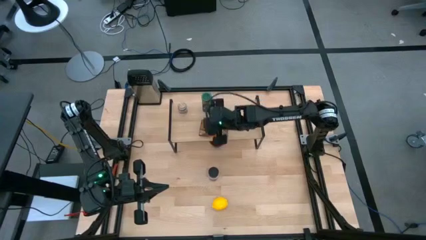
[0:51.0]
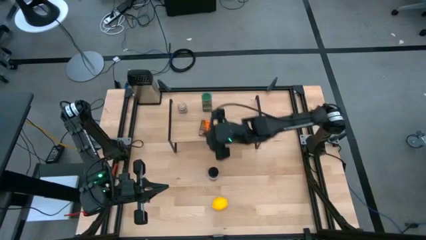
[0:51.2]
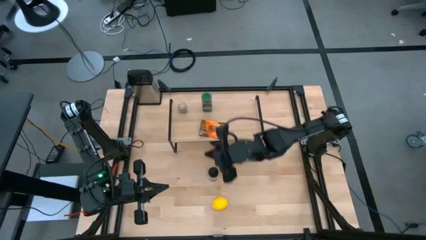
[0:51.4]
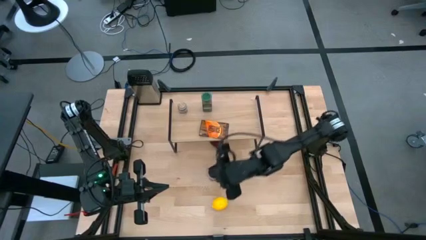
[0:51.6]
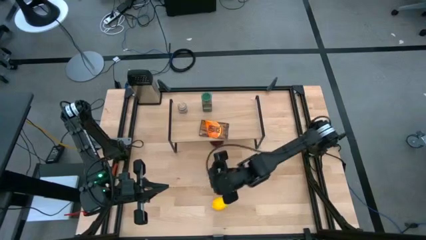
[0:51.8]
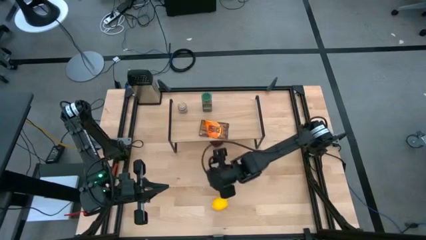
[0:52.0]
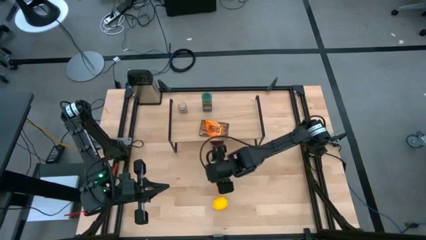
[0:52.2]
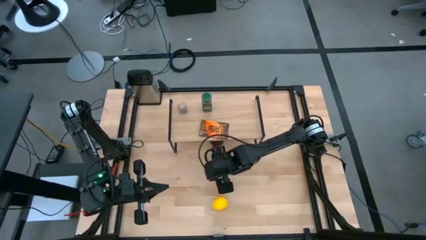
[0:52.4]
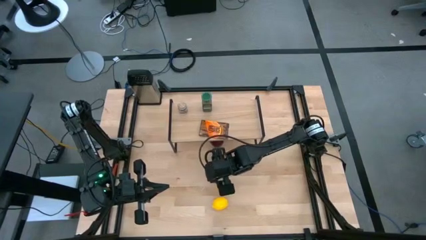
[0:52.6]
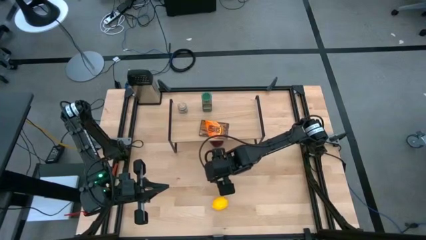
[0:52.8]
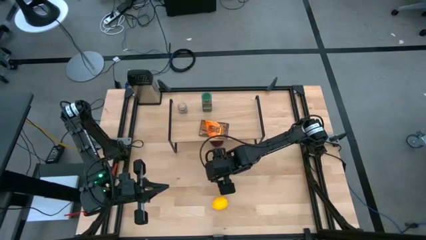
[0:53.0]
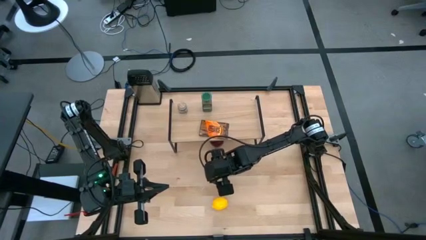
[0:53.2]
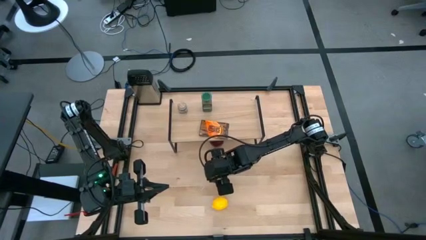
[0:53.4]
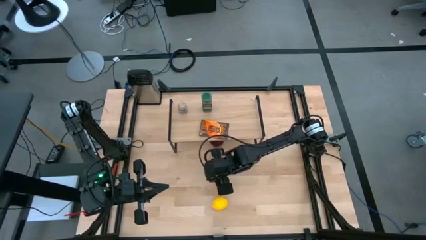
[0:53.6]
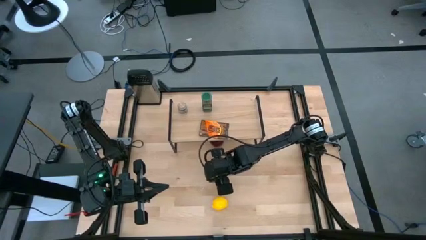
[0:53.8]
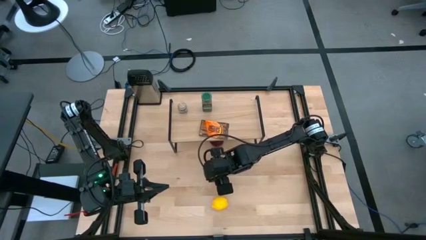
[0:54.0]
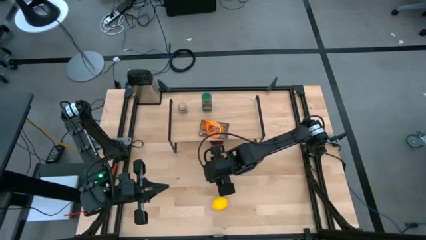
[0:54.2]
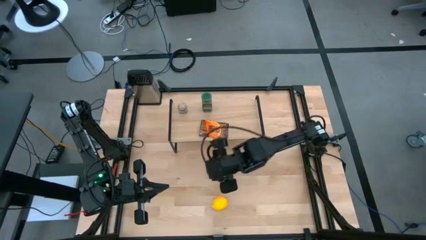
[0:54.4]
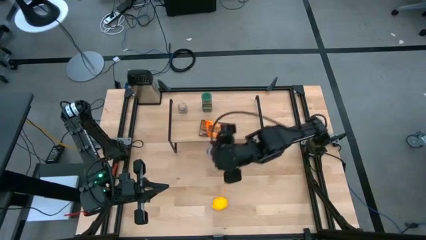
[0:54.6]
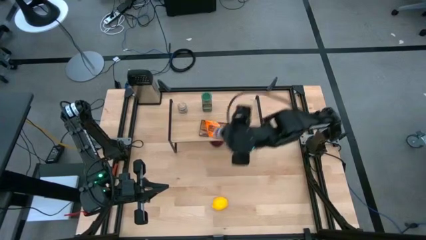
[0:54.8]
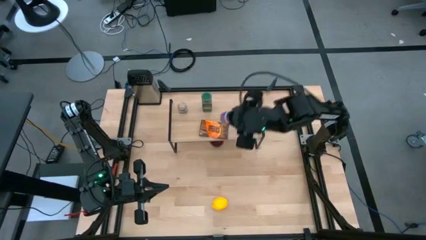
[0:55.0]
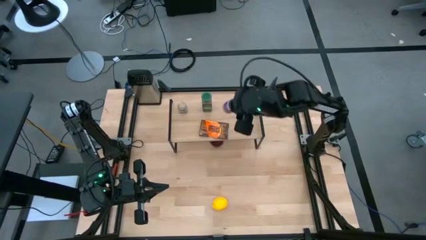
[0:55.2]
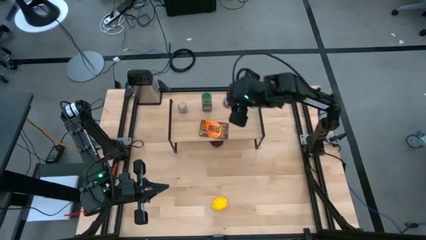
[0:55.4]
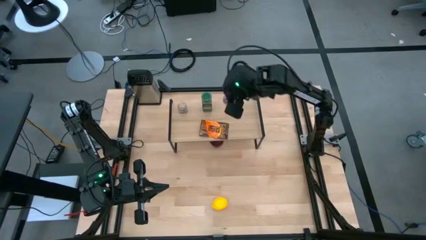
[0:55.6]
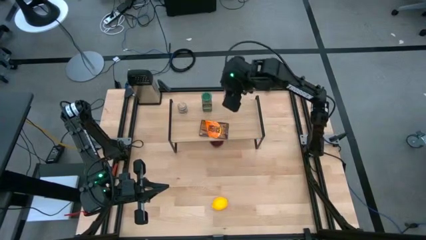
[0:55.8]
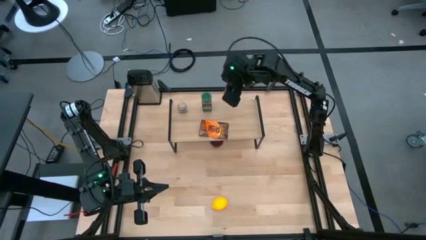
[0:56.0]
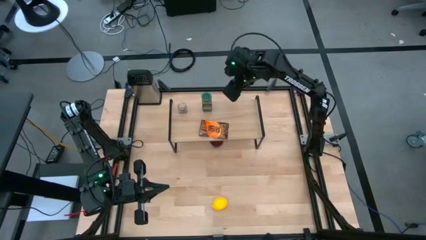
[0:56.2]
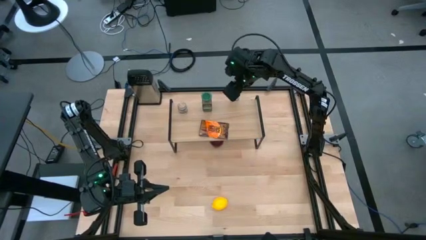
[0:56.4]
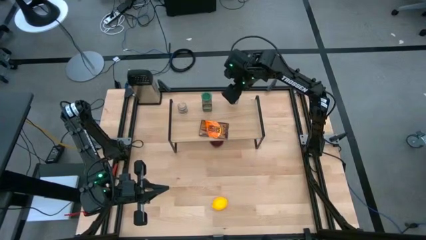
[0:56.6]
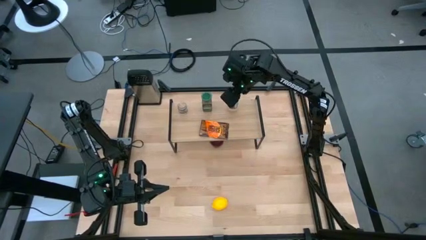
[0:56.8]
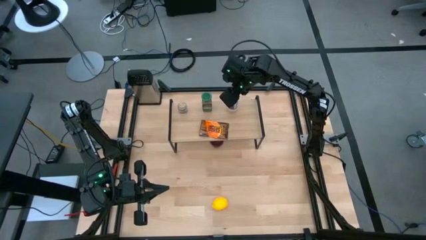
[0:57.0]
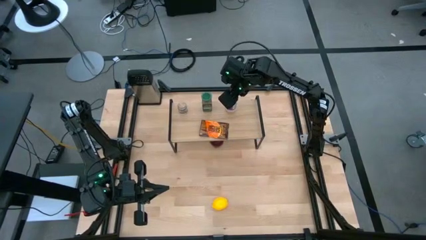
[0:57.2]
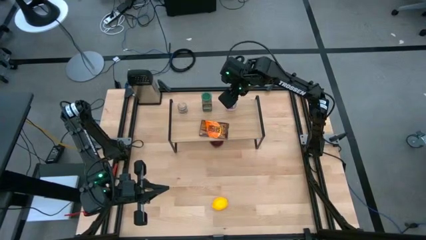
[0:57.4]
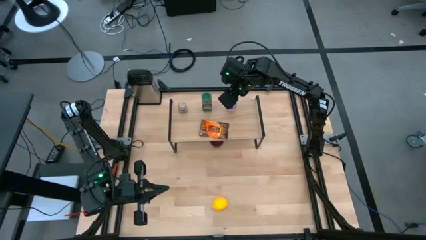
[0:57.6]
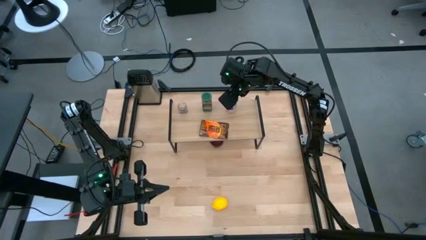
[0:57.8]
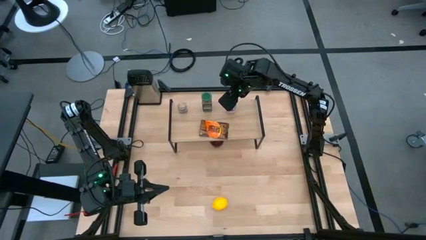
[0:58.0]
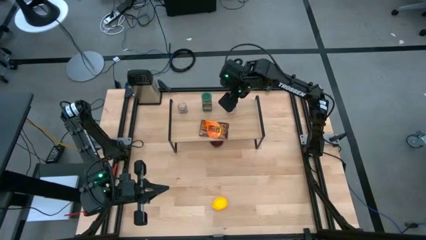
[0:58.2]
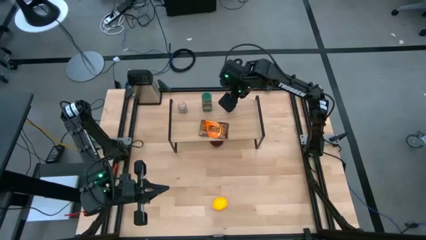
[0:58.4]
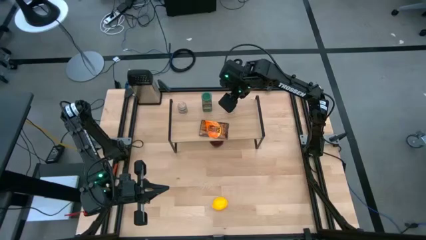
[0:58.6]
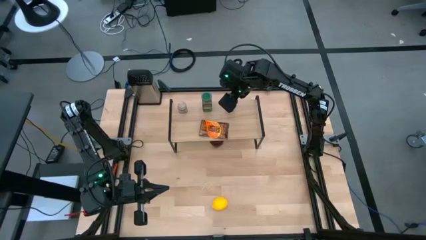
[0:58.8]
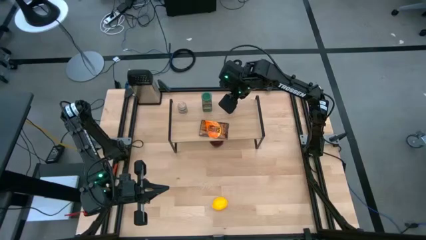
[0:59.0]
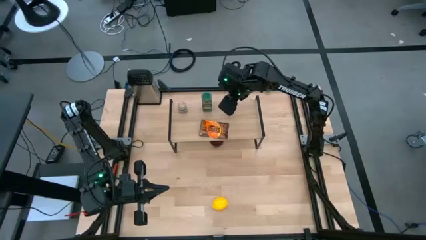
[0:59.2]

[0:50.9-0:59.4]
Task: Shelf spices
Put the black seasoning bottle on the shelf

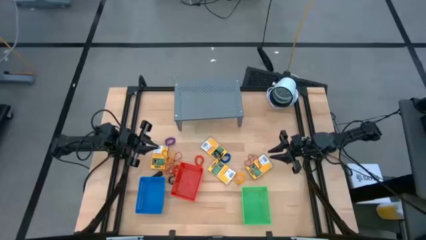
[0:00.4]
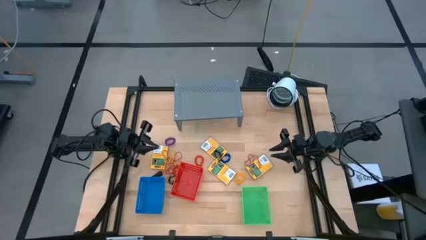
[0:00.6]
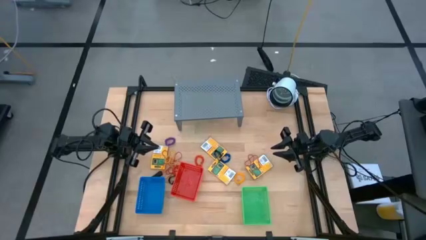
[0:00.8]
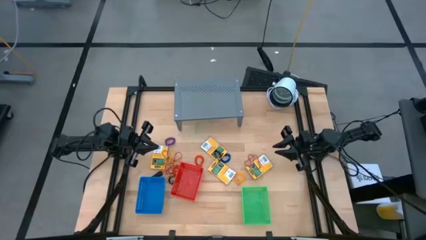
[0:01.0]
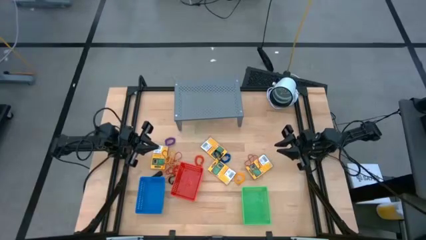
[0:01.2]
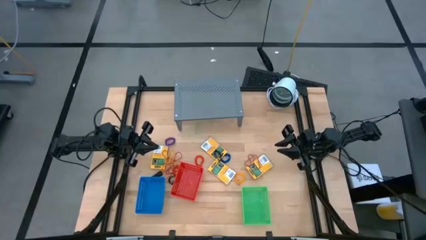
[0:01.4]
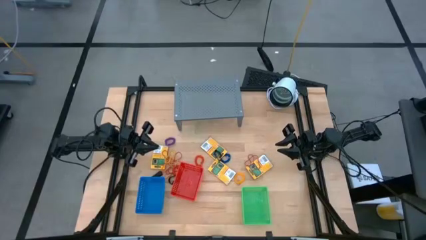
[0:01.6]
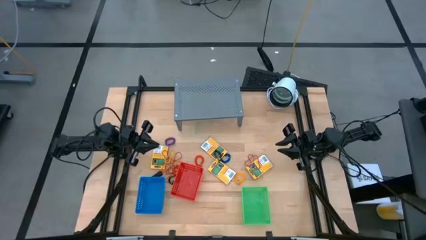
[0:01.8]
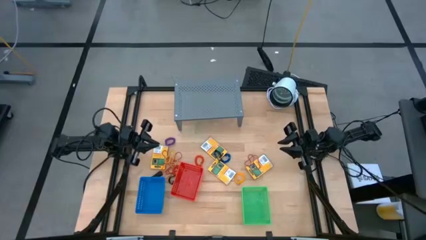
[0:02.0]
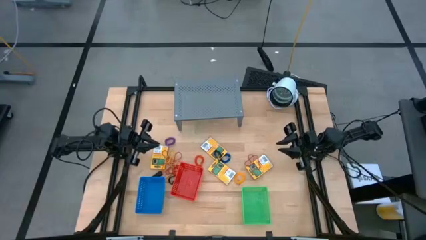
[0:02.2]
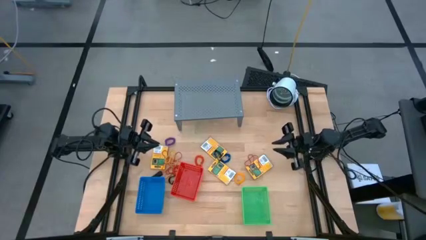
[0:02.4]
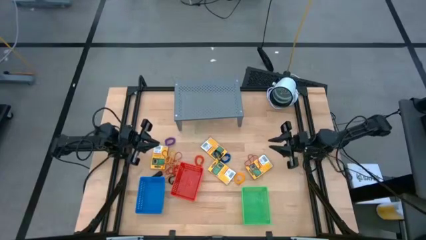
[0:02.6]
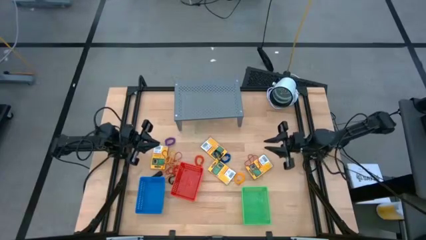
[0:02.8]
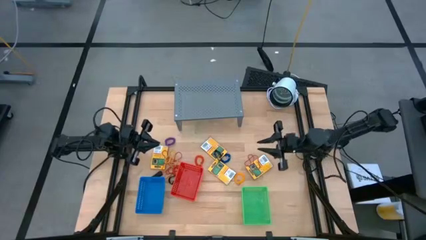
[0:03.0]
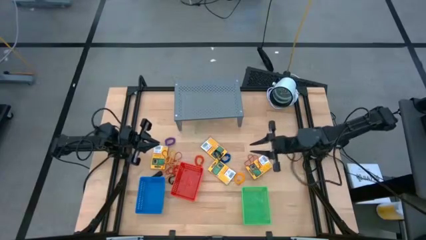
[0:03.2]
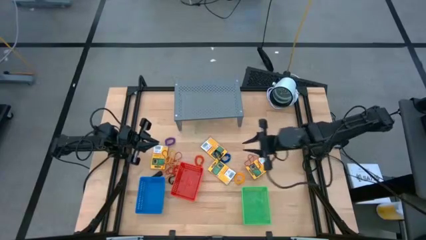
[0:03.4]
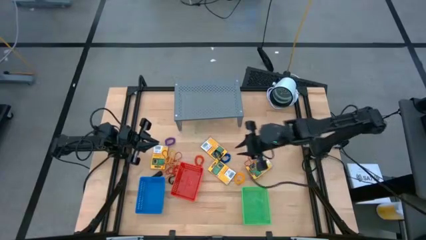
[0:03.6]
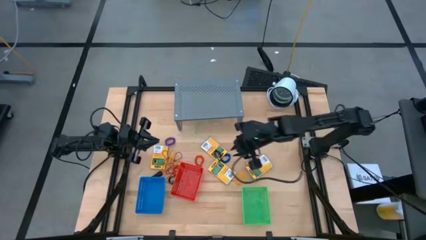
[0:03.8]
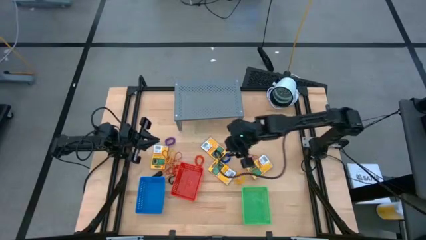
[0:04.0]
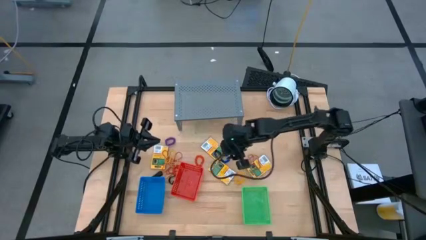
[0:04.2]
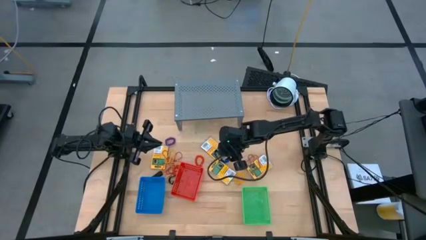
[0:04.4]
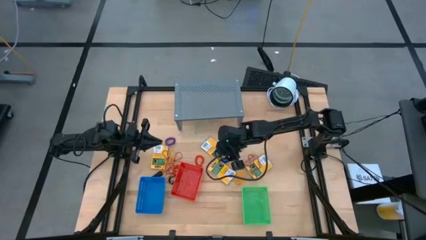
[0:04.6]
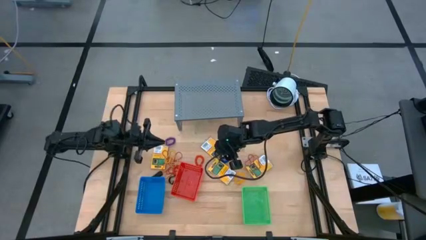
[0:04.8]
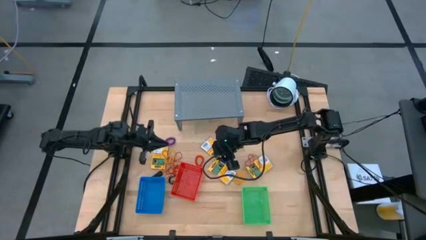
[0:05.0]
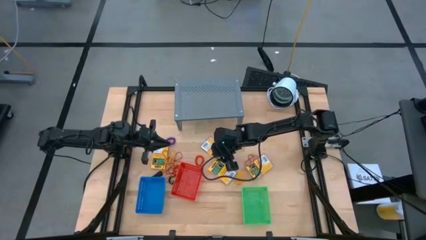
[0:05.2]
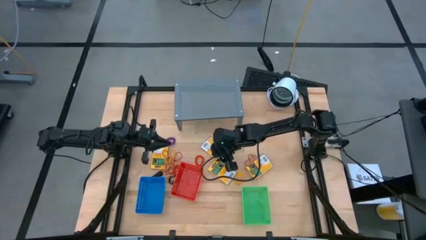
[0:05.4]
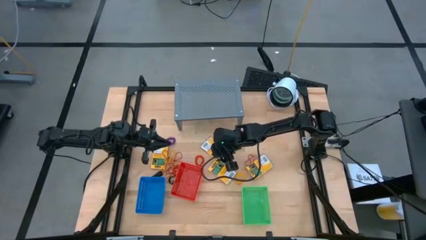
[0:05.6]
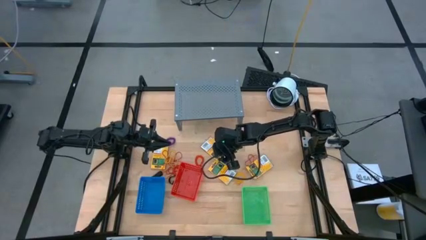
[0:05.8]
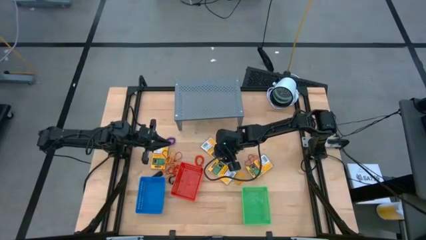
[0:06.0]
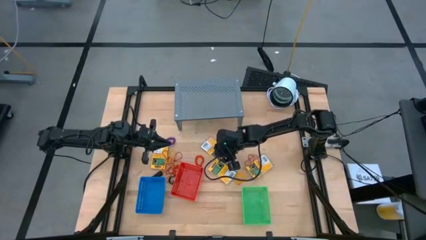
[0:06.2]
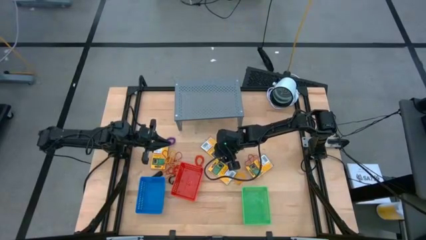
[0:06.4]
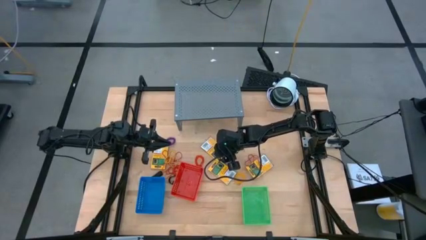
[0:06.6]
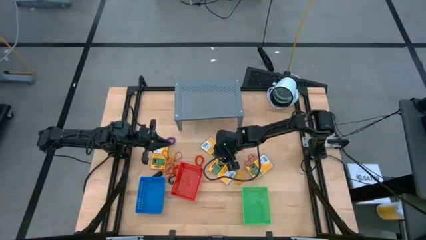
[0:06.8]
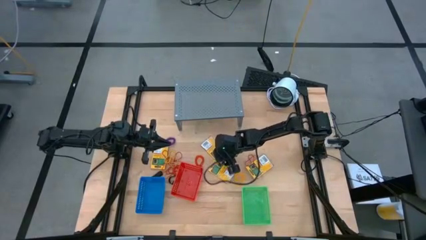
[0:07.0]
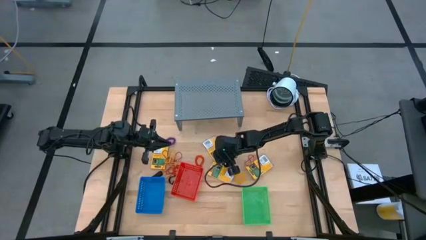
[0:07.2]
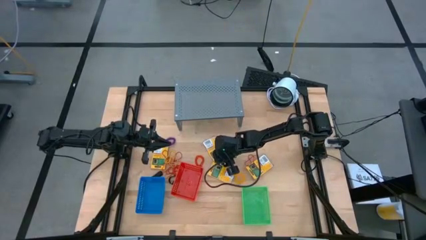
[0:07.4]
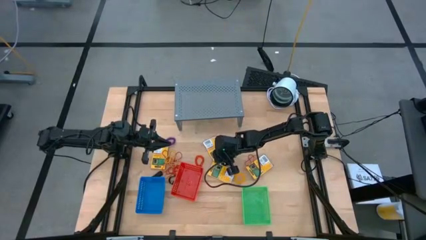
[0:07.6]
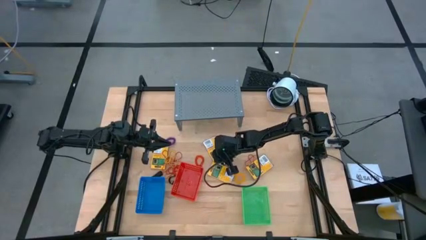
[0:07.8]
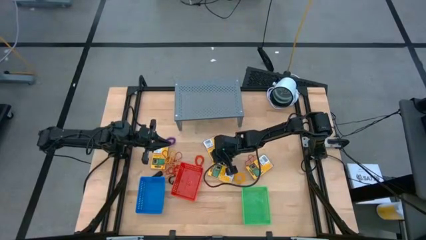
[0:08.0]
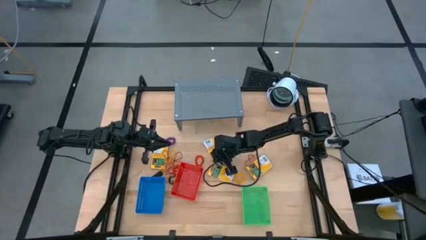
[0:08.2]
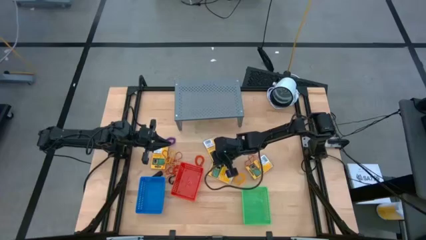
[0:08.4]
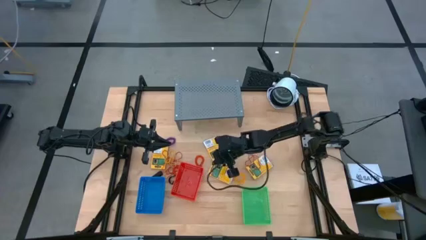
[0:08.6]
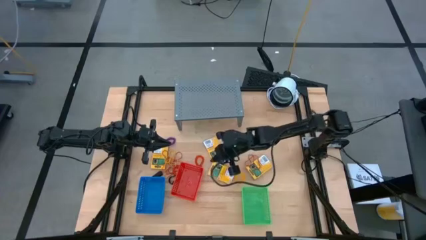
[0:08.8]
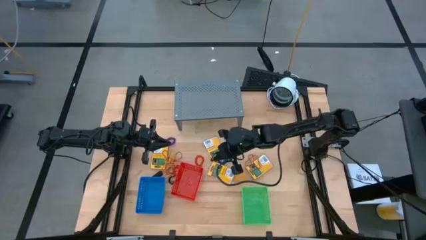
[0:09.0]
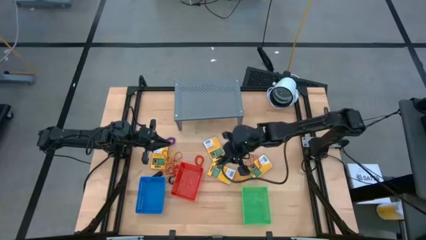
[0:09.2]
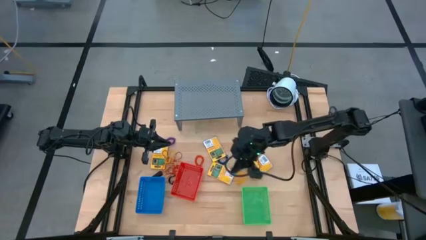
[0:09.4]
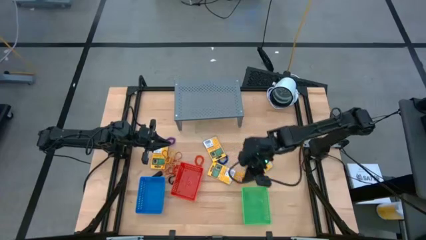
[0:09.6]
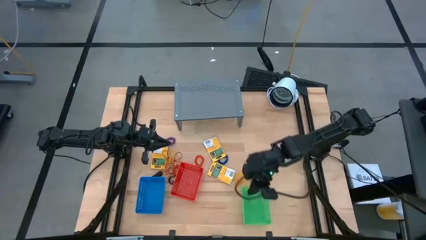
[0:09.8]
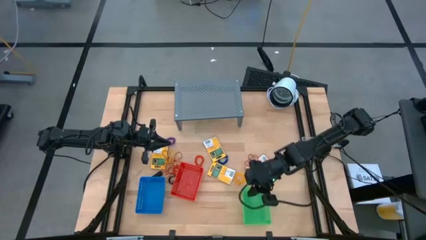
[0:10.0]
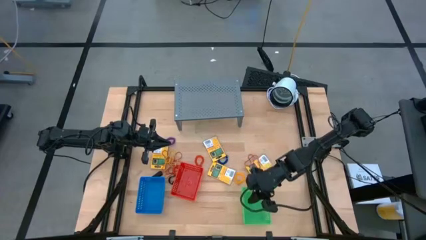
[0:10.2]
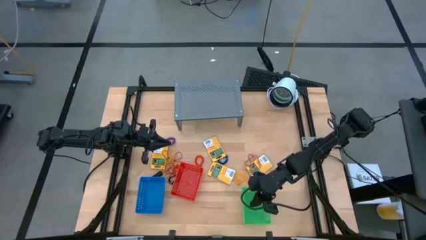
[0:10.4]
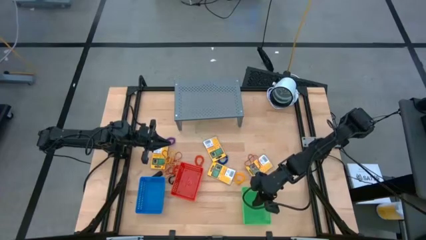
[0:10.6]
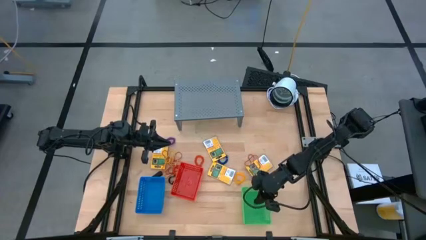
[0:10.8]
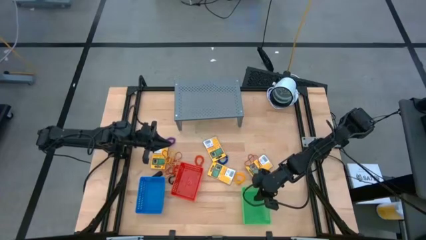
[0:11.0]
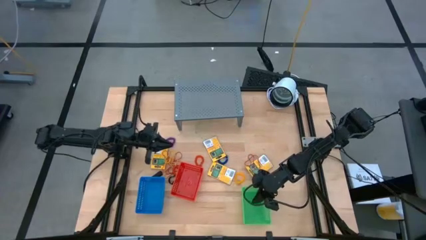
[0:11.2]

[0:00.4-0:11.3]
Task: Pick & Place Office Desk Supplies
Put the top black rubber band into the green basket
